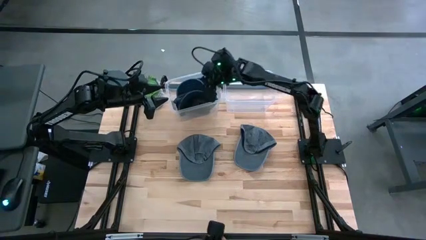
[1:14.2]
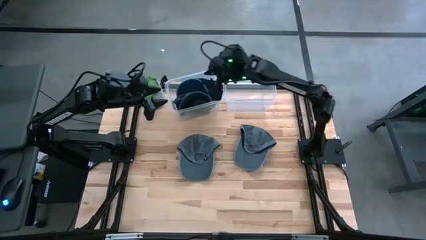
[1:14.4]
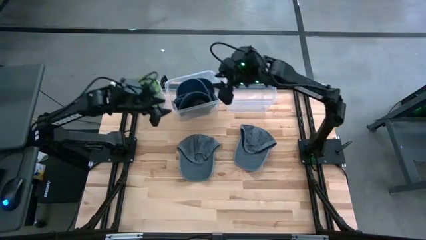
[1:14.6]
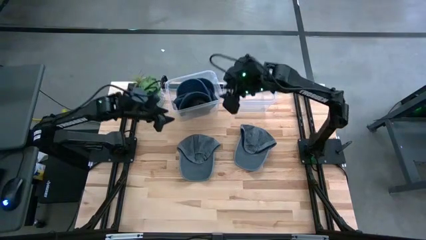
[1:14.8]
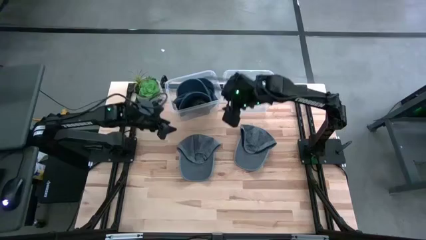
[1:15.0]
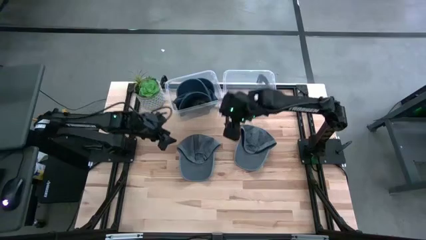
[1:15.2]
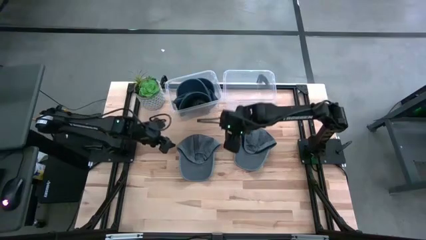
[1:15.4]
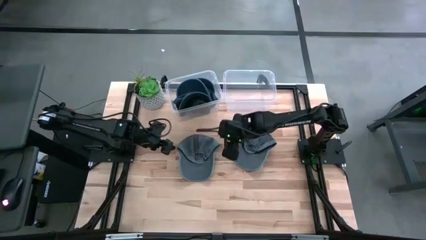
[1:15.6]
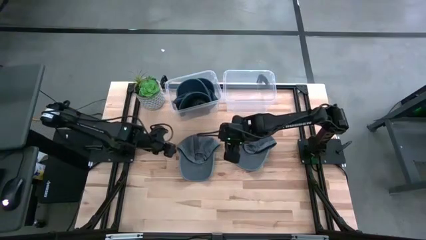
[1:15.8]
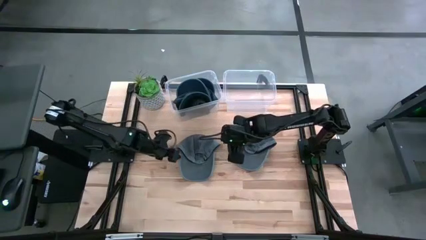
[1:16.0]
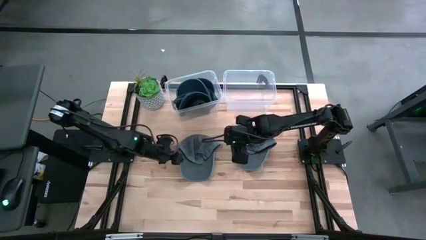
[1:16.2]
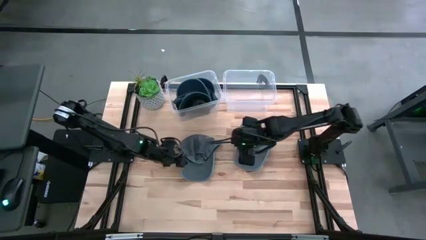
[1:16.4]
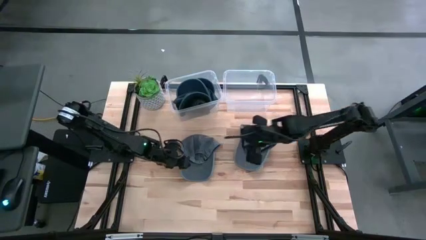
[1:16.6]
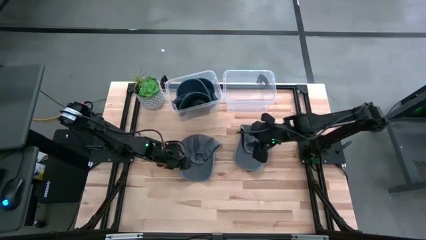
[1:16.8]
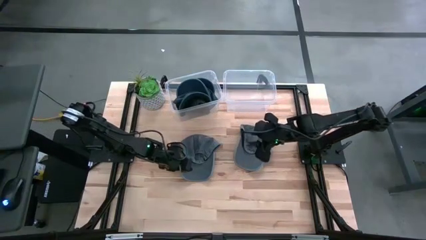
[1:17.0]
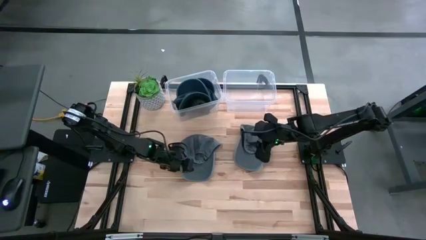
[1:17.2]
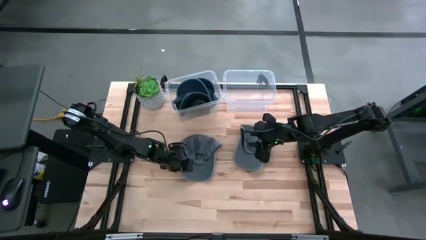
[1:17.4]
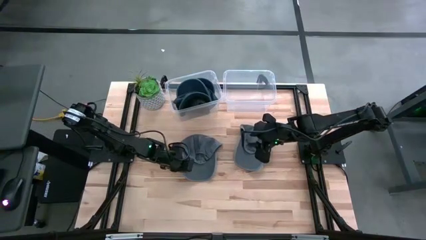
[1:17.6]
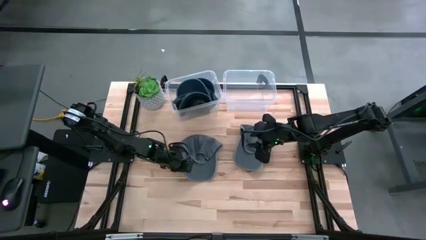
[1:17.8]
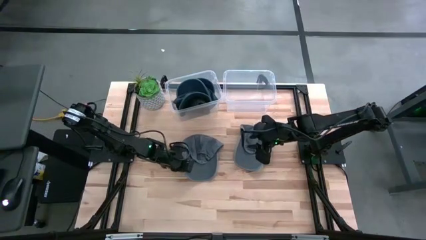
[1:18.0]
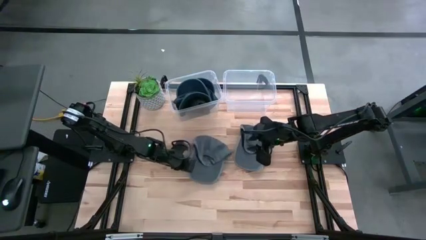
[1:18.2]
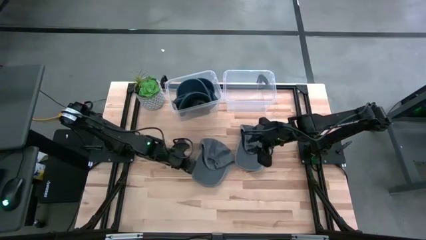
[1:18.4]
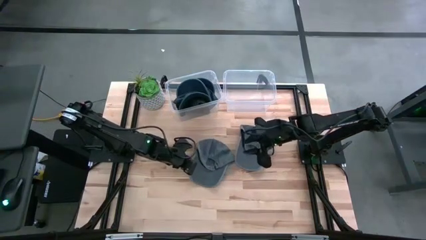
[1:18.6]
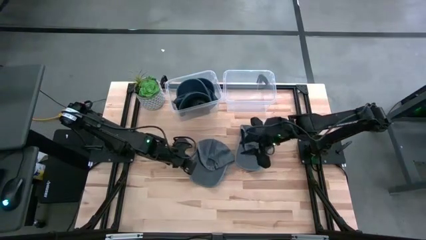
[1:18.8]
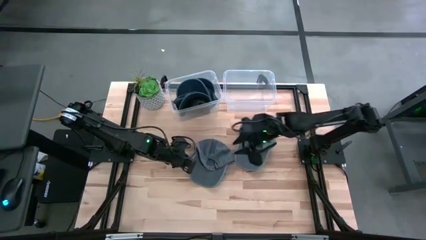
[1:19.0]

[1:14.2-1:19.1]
Task: Pick & Place hat
Put the left gray cap into the right transparent bin

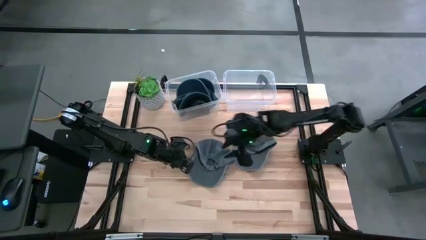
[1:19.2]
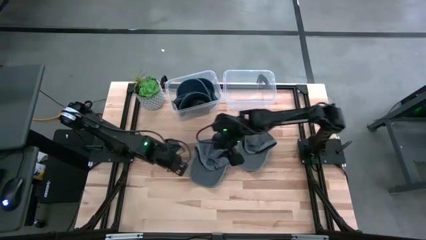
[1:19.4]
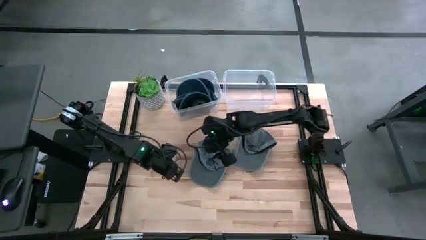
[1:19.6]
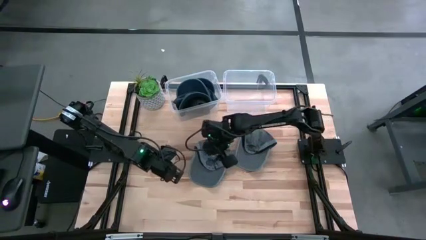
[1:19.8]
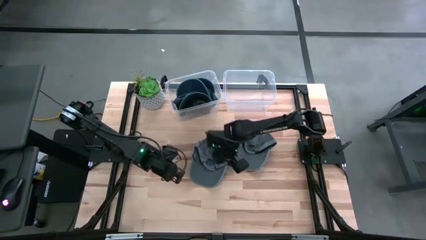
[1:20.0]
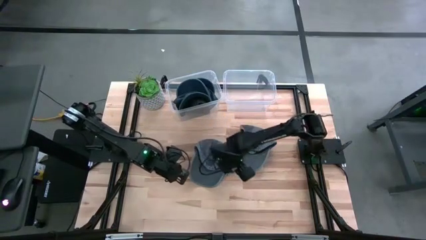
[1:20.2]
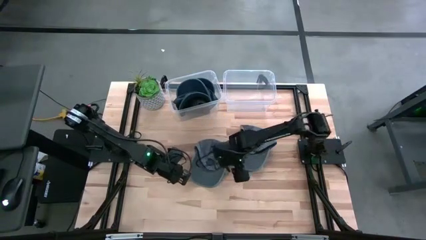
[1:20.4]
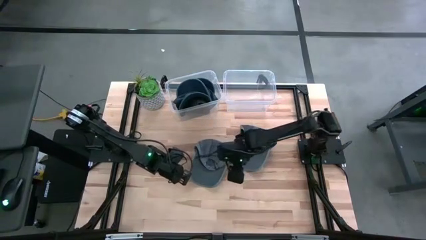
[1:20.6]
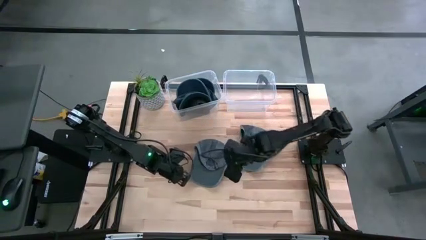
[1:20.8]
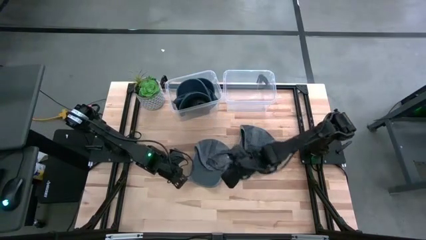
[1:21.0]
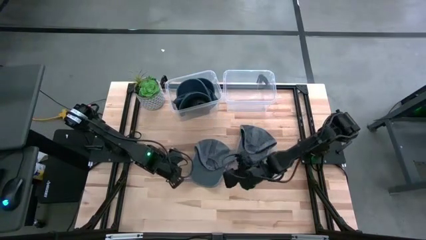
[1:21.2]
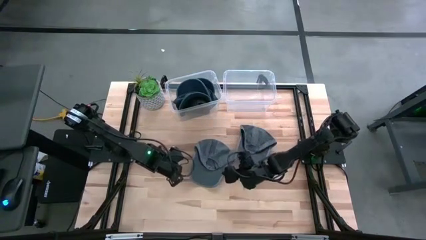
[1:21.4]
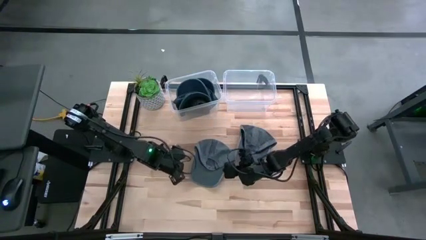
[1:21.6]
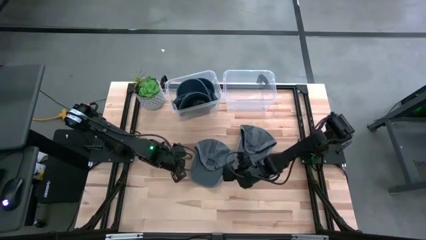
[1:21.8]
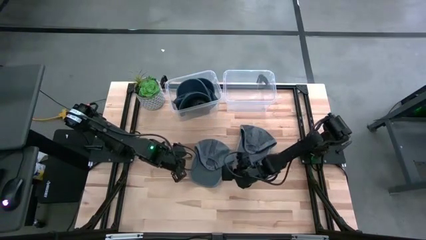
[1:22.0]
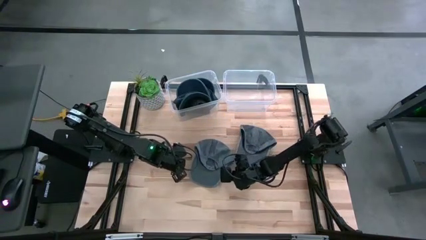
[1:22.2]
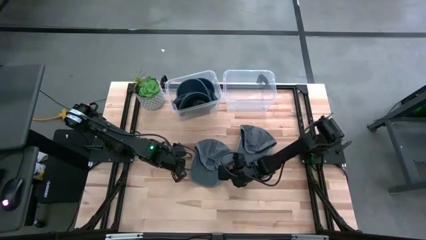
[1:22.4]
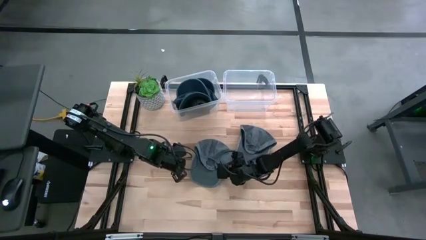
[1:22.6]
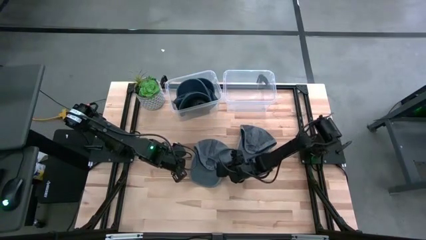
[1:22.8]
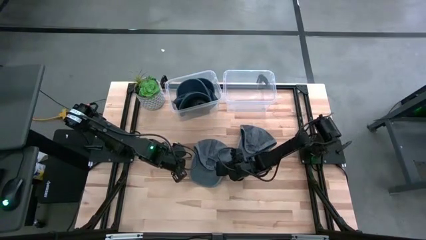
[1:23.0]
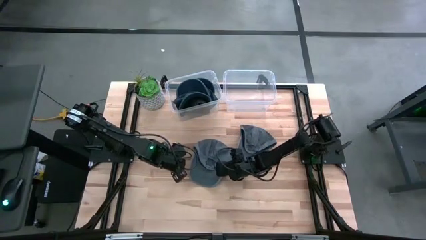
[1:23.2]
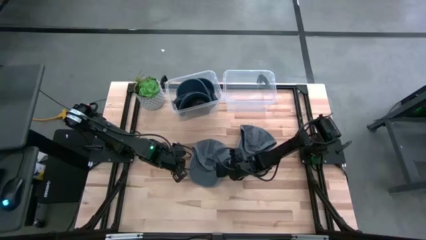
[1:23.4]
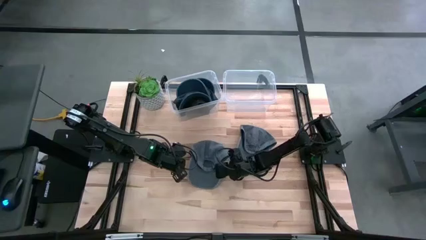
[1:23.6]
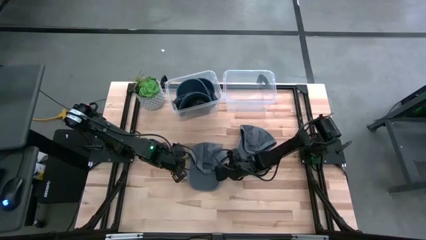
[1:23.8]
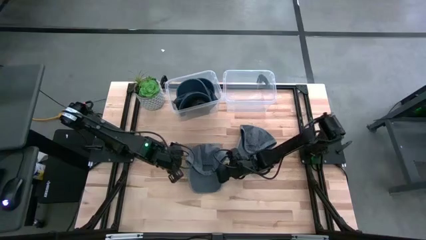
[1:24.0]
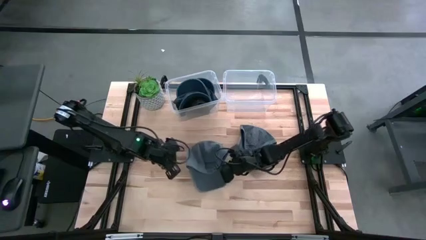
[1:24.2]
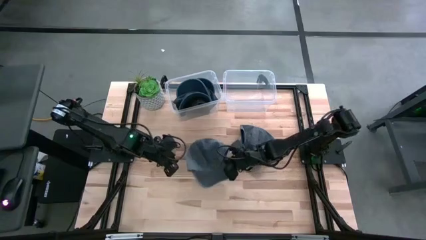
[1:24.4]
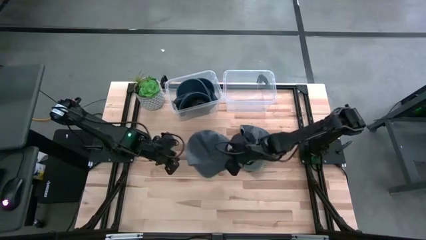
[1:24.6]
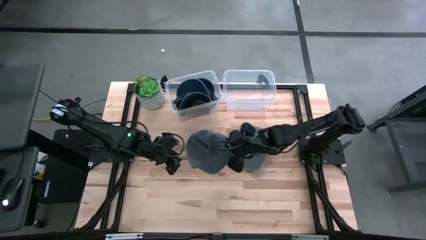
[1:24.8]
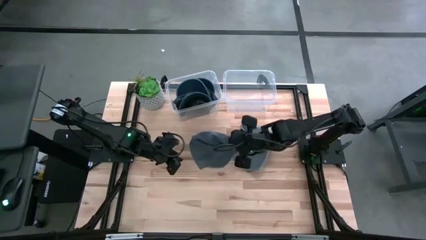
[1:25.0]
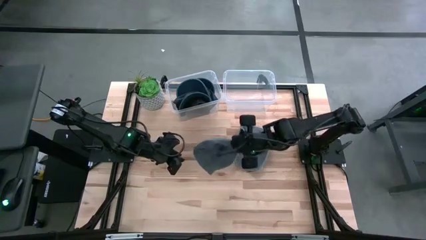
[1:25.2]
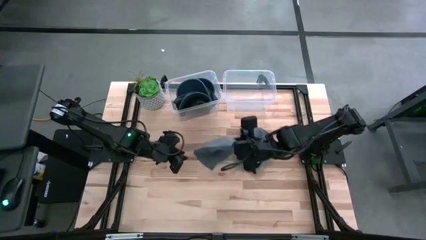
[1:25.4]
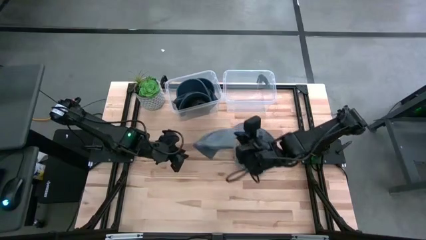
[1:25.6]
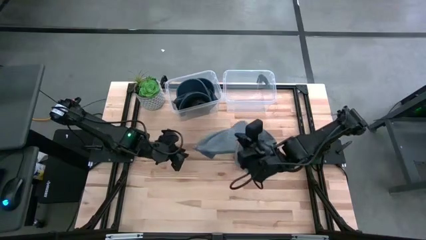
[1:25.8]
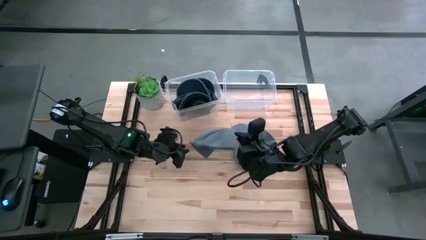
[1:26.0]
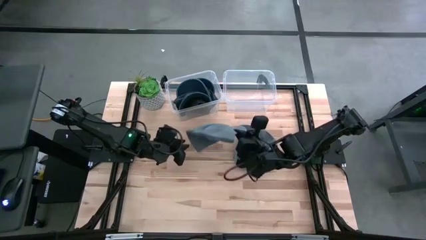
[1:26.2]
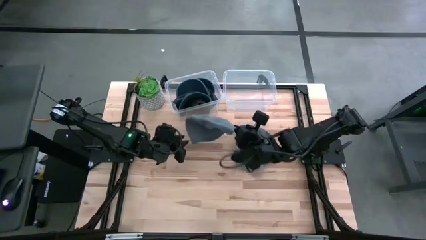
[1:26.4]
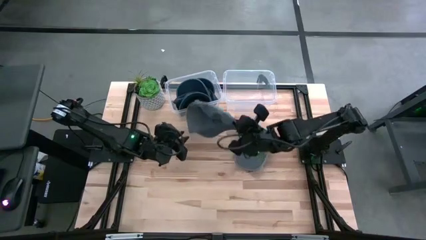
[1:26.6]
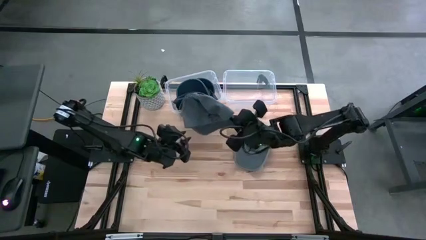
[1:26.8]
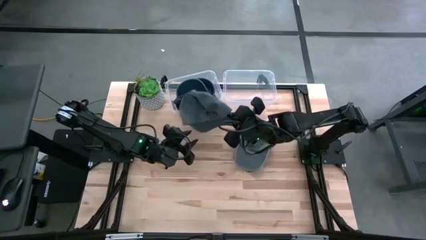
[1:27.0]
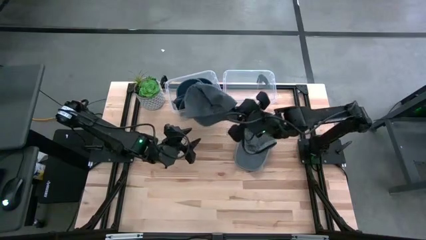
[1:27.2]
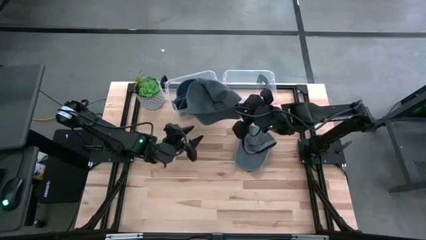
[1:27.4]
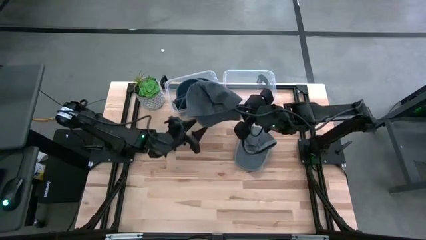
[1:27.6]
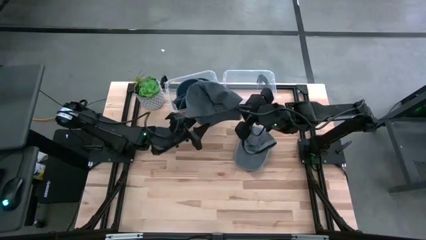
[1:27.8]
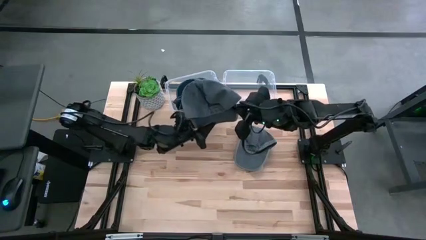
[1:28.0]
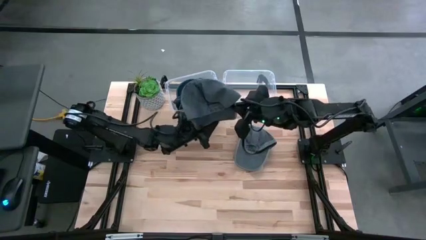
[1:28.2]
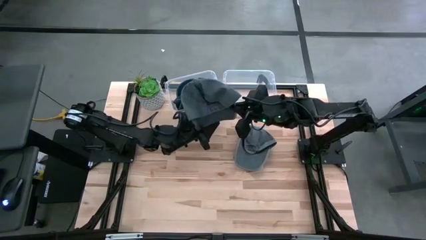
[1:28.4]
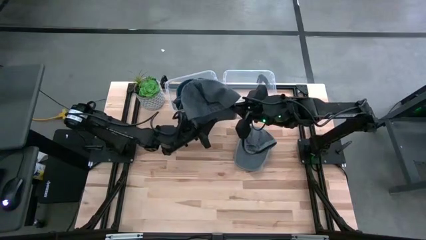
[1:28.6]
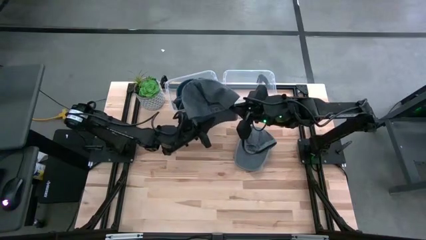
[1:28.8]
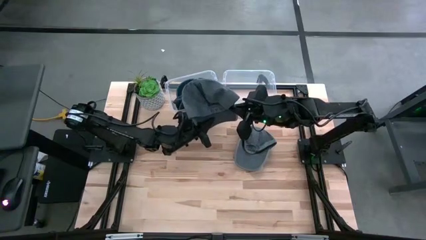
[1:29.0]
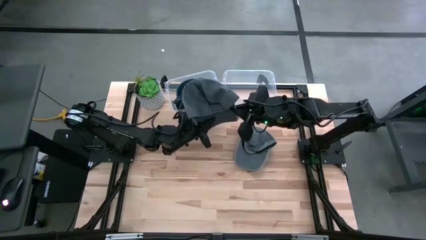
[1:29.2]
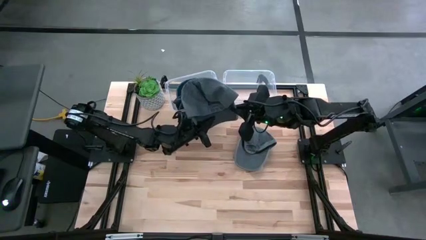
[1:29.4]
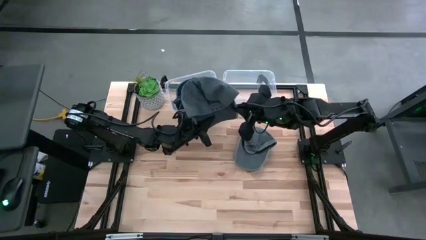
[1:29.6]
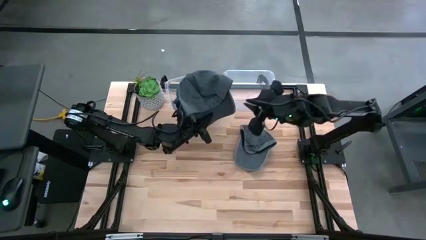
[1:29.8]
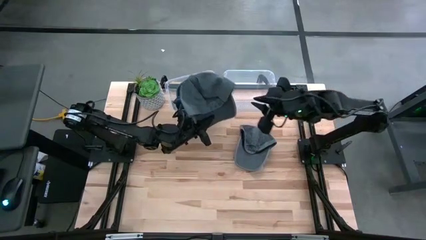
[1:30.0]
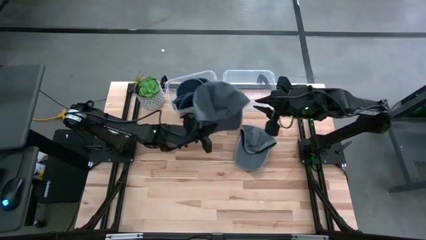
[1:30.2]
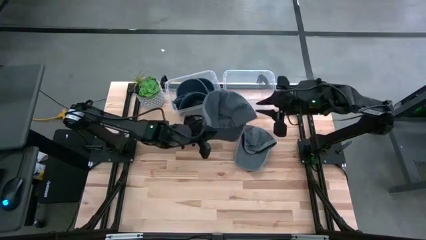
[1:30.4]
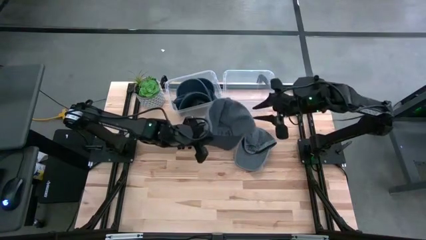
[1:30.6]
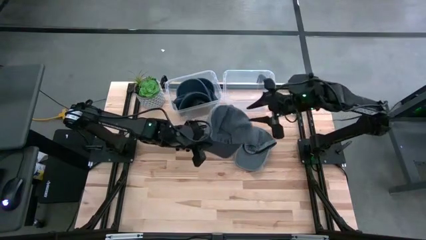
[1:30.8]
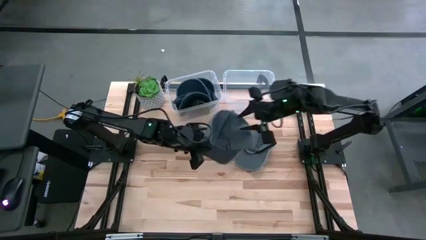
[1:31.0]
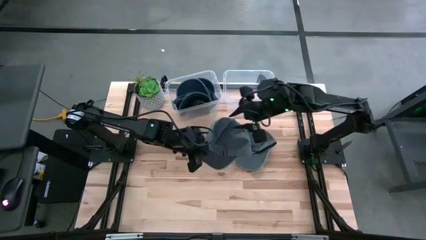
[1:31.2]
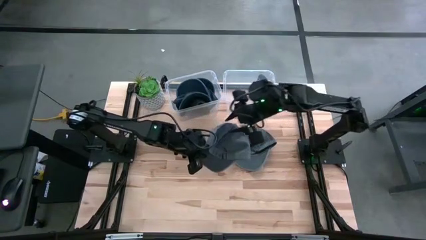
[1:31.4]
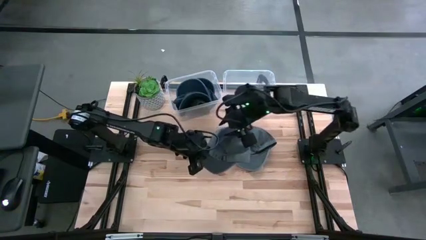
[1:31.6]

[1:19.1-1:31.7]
Put the left gray cap into the right transparent bin
